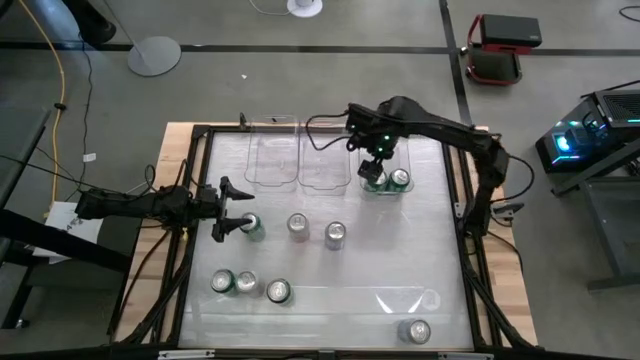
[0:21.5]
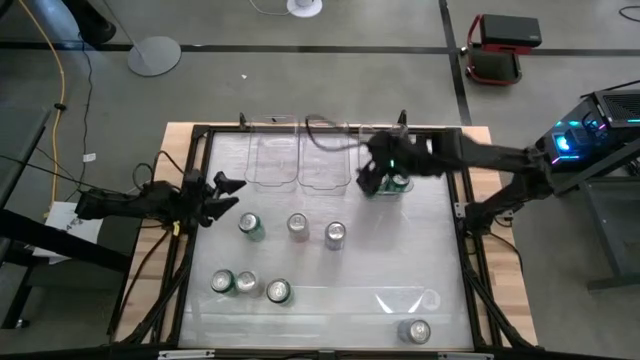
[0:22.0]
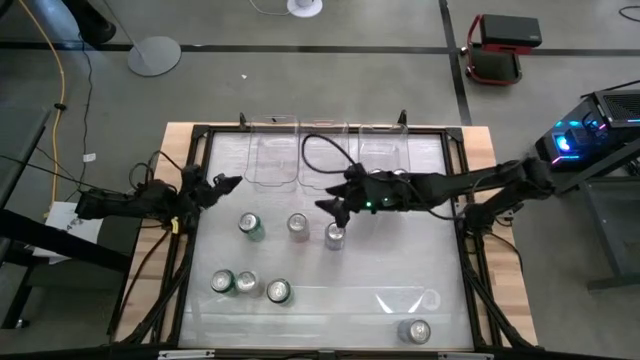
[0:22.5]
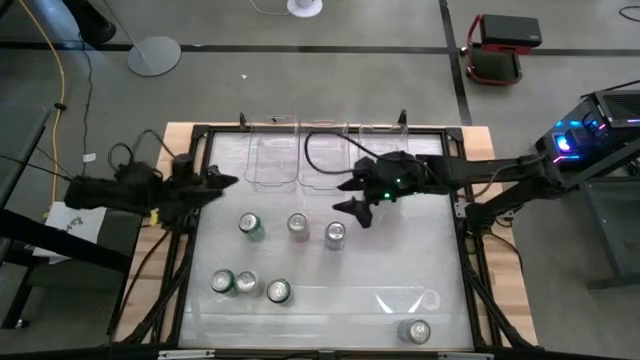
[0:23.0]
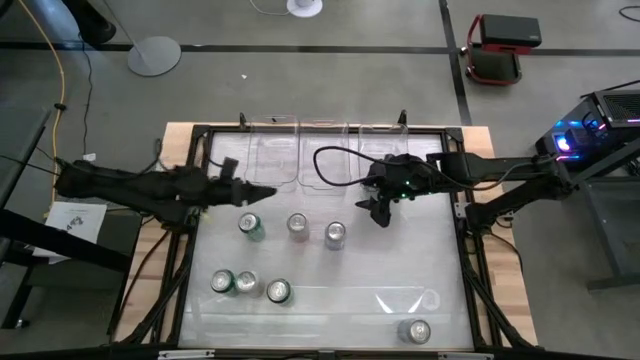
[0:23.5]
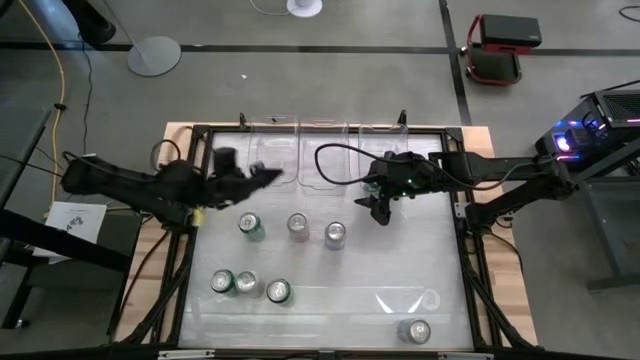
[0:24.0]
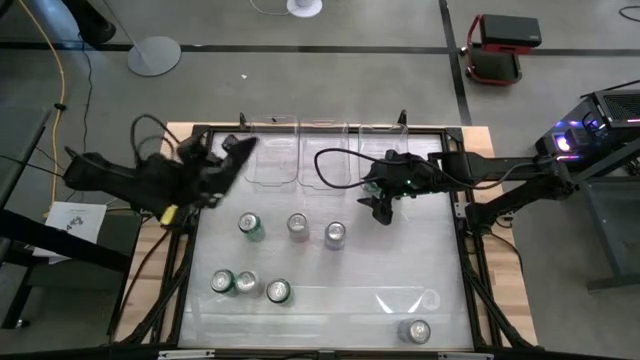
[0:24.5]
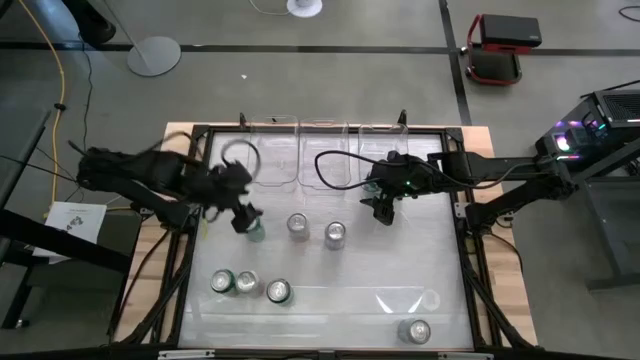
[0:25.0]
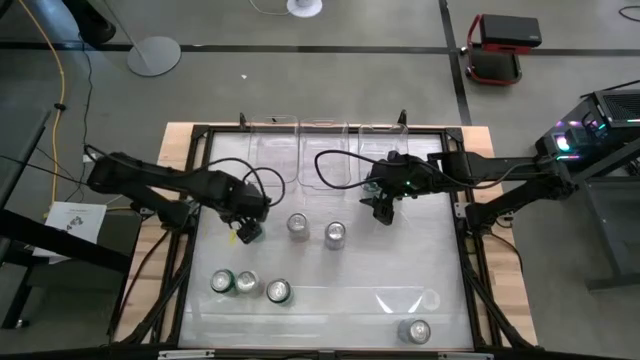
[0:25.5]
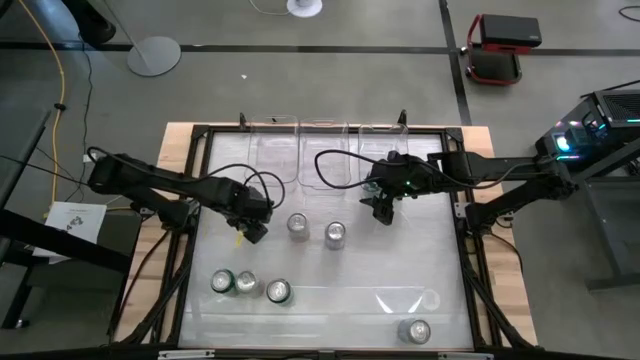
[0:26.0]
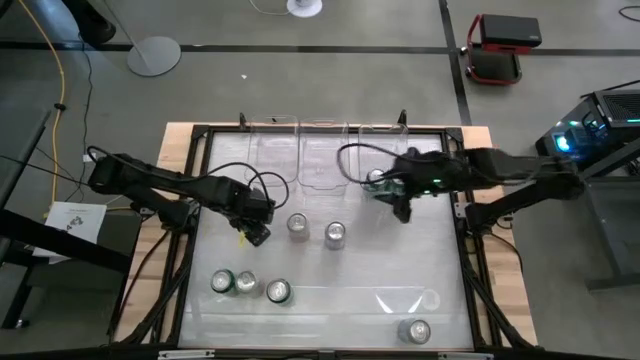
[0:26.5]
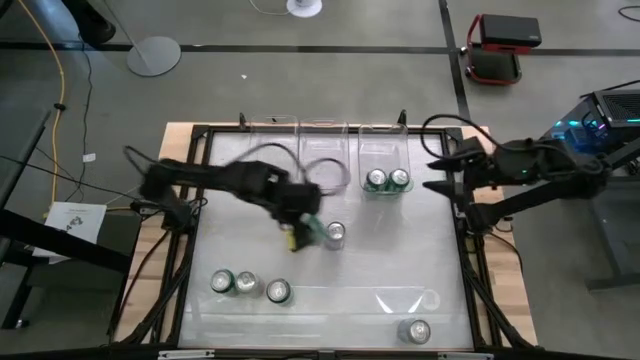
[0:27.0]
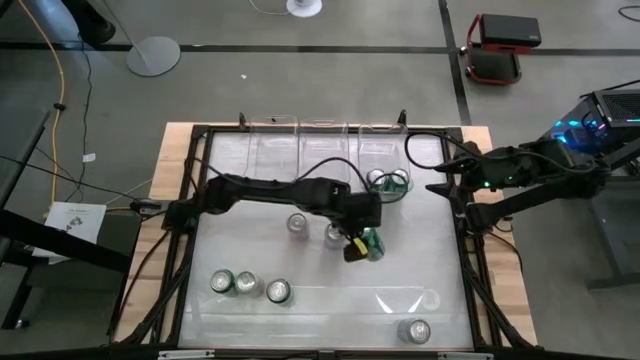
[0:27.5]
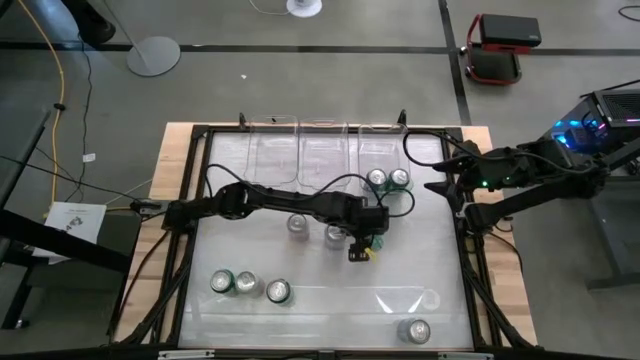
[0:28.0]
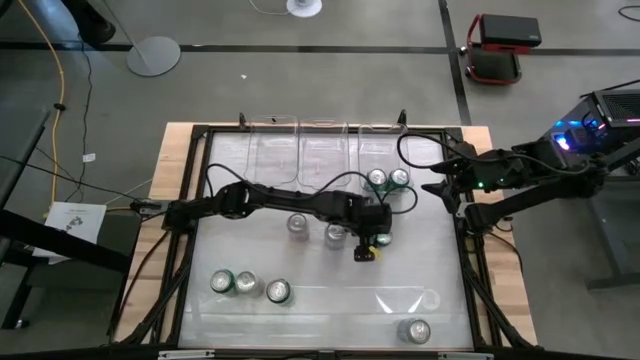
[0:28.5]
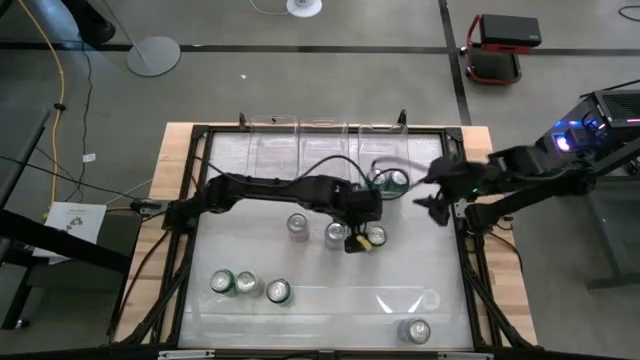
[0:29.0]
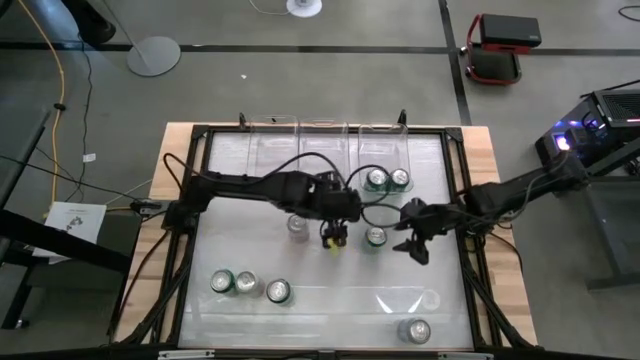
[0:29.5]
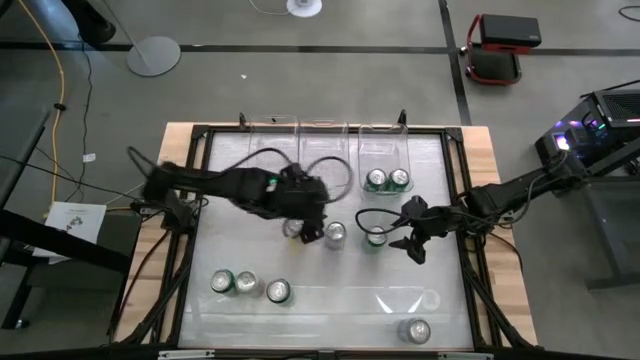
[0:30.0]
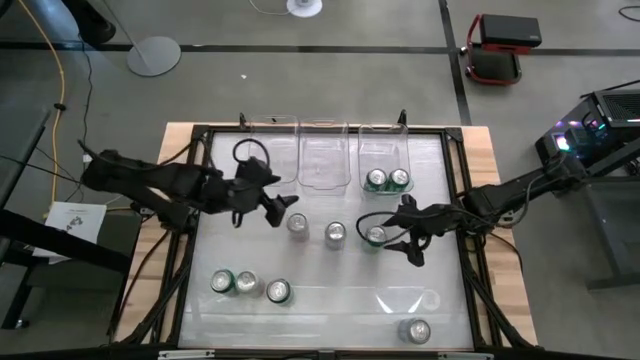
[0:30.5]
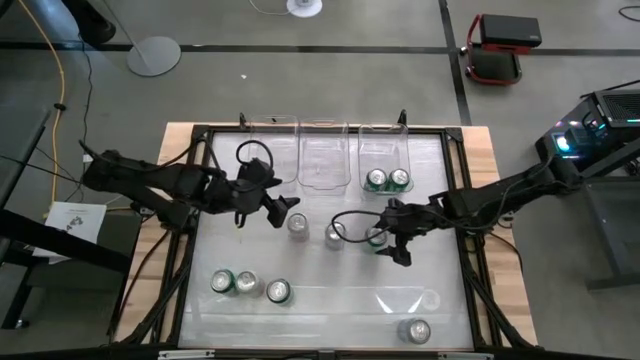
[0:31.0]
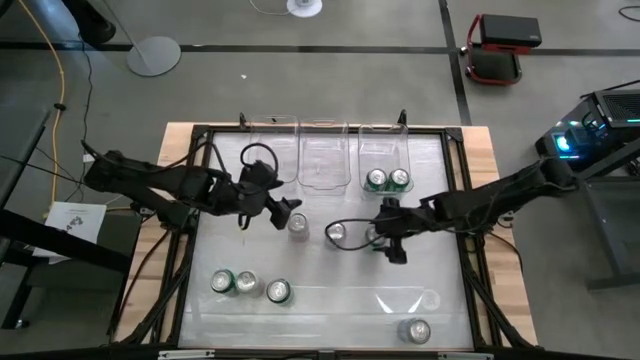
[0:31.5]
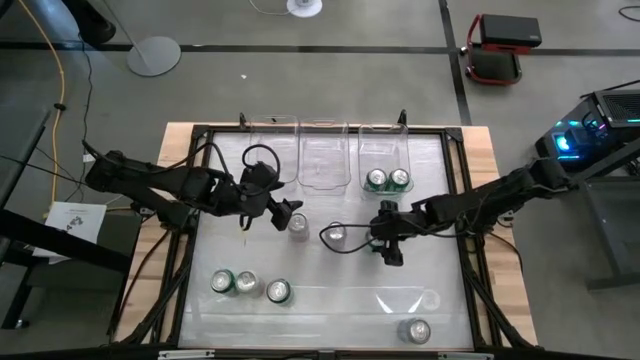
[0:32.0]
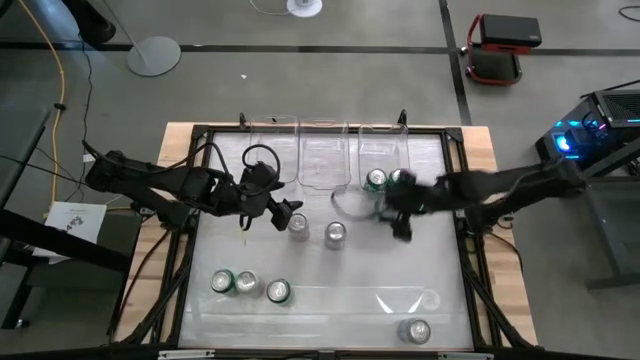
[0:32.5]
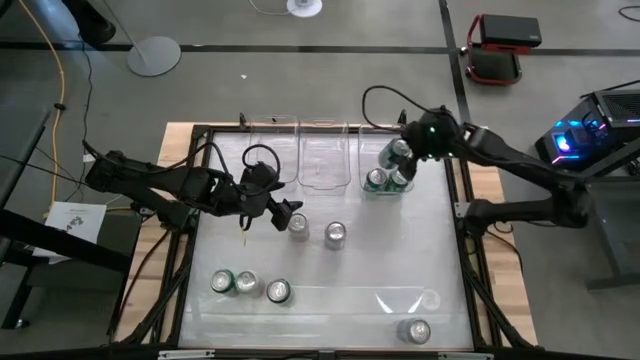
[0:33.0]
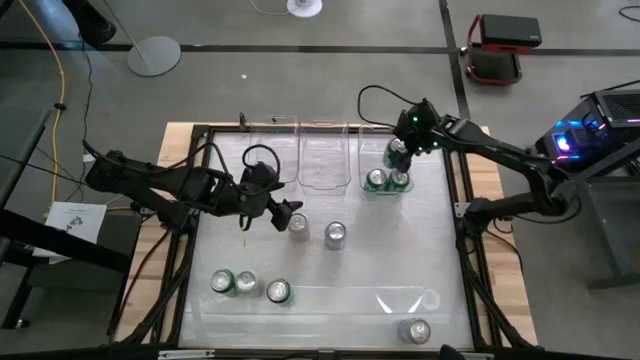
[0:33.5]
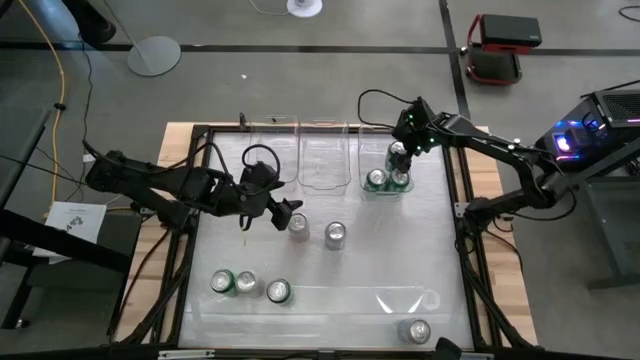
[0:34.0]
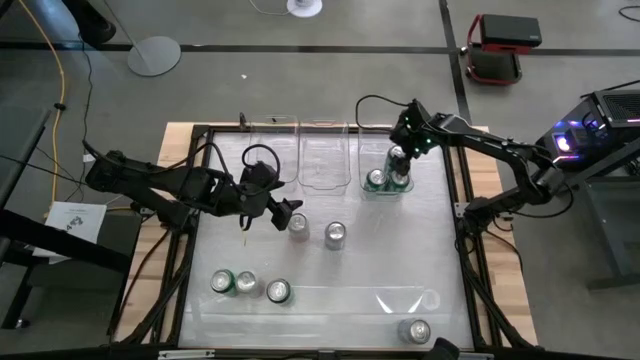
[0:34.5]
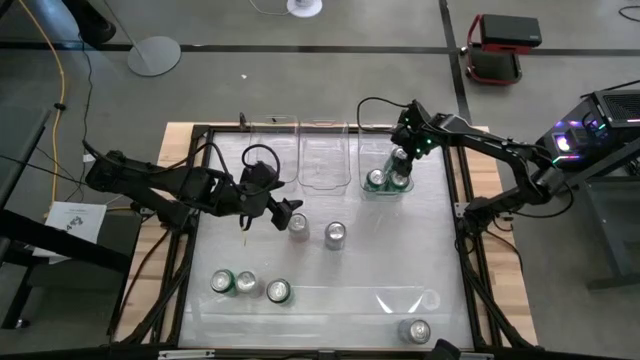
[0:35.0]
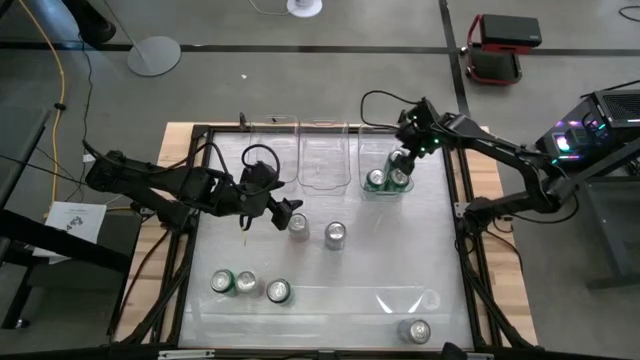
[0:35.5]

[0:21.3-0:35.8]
Task: Sort soda cans
Put green soda can into the right transparent bin

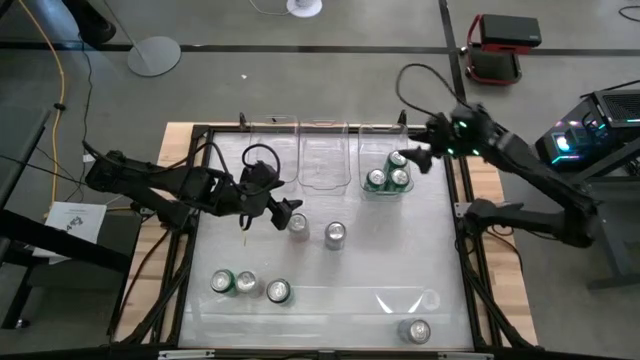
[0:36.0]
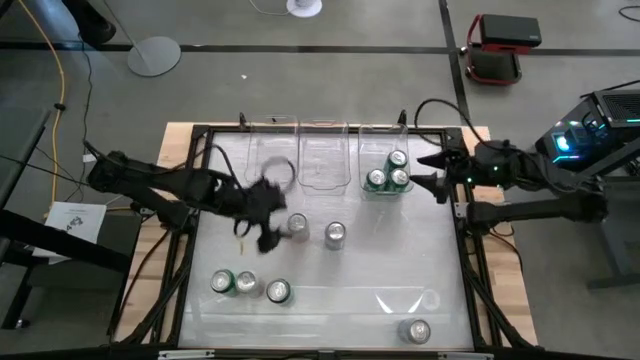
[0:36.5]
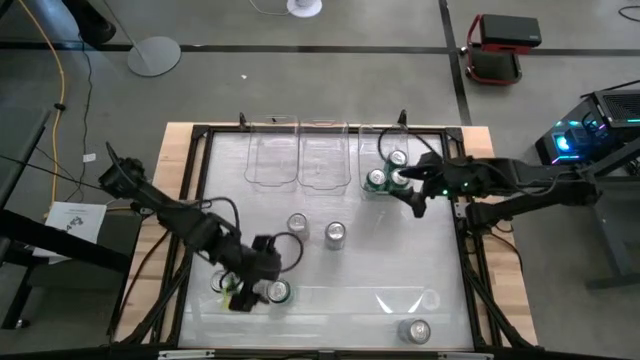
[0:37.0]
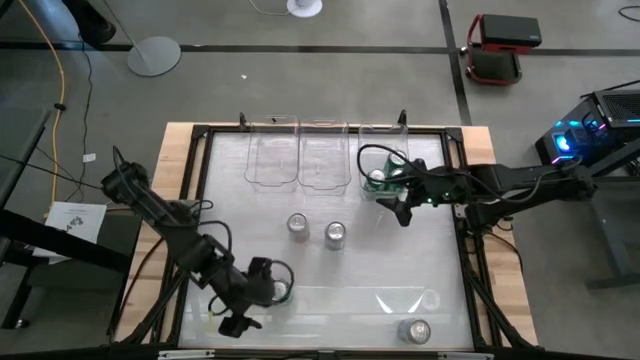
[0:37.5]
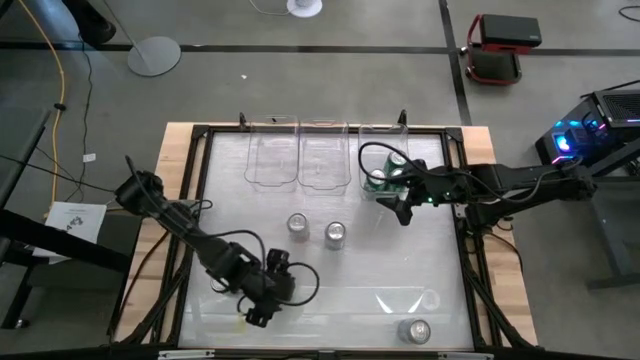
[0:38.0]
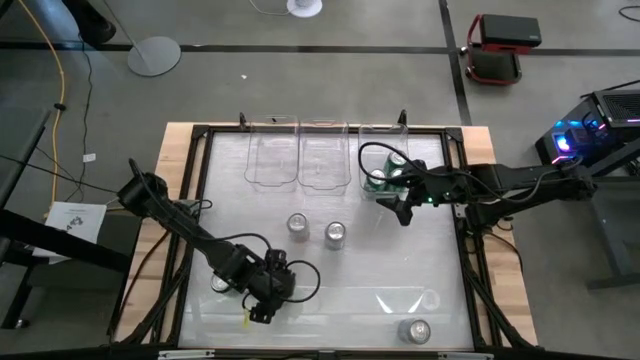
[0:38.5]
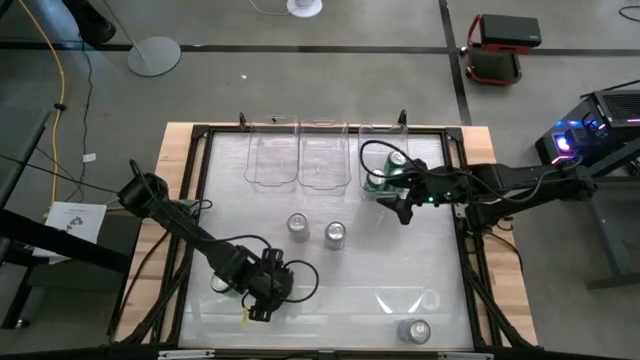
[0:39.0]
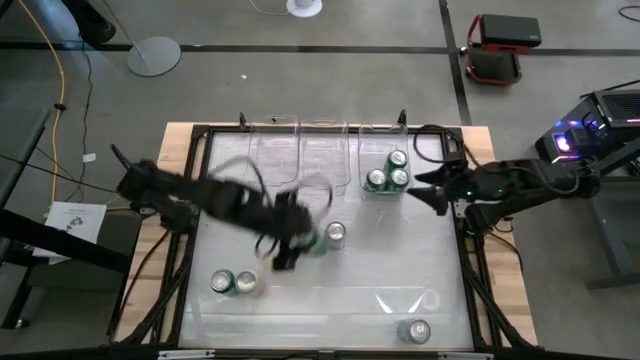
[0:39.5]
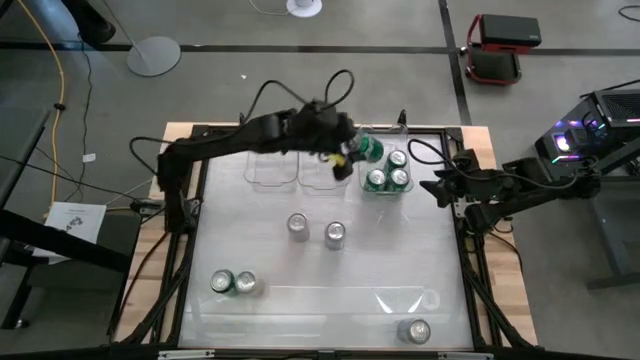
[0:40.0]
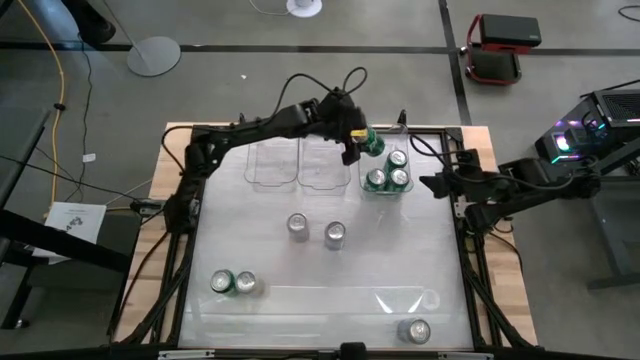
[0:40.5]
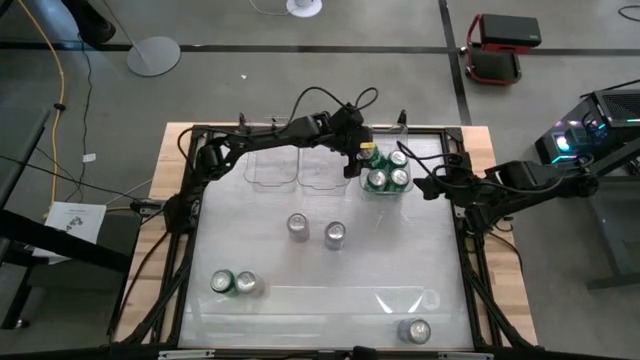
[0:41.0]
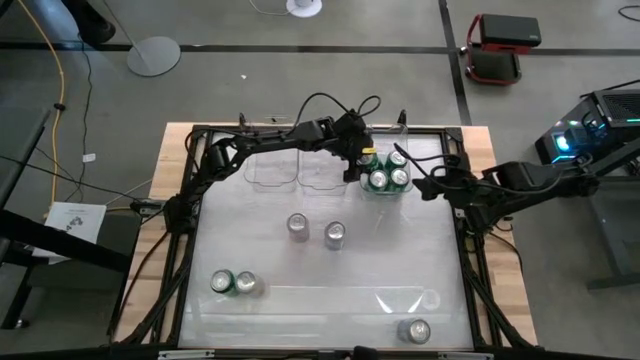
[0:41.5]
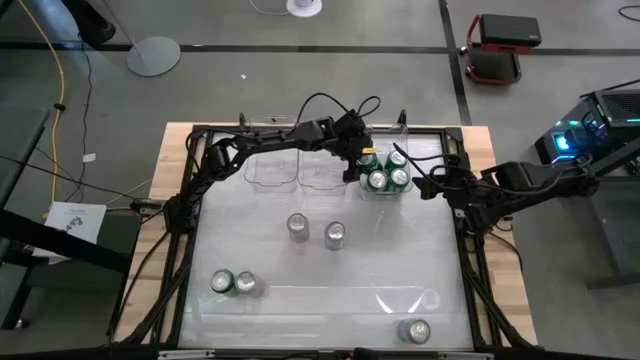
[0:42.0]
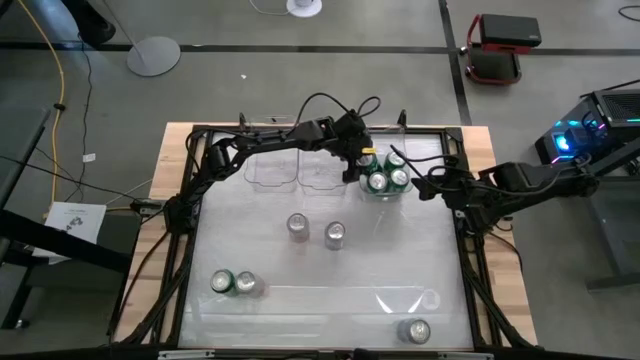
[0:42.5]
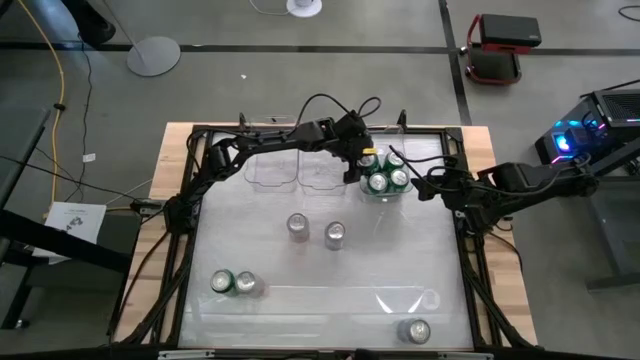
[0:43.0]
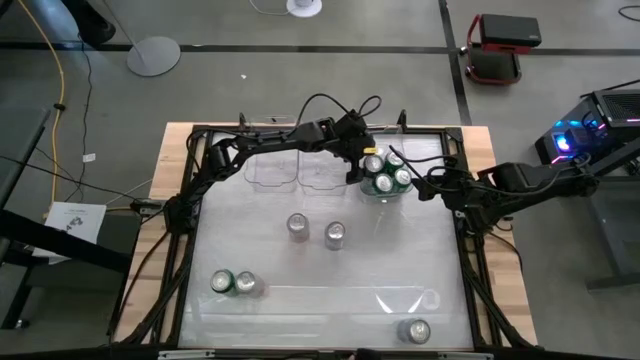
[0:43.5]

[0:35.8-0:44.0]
Put green soda can into the right transparent bin
